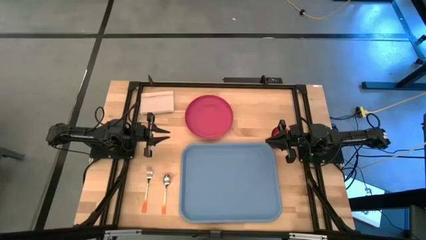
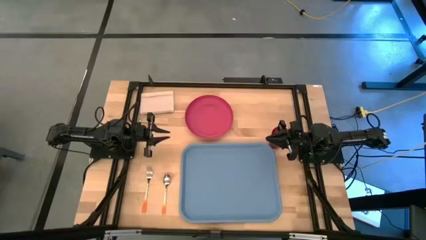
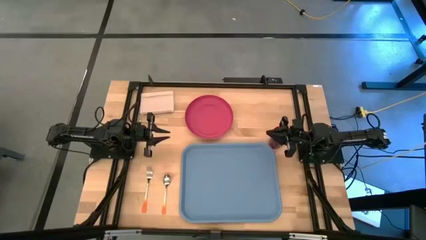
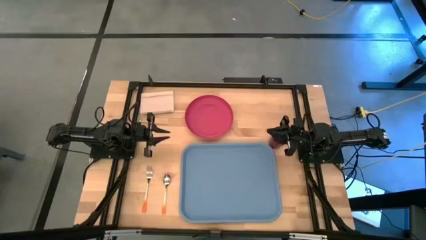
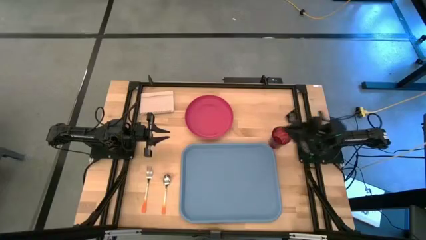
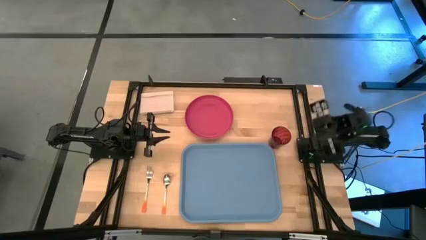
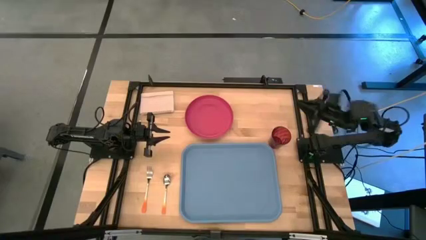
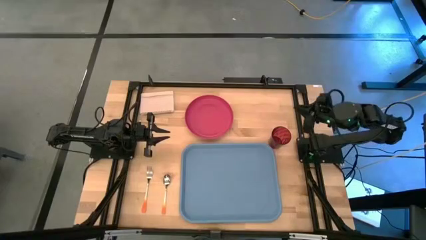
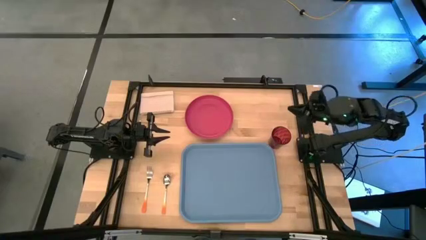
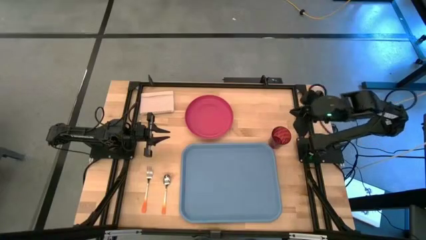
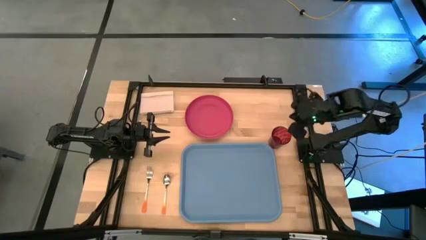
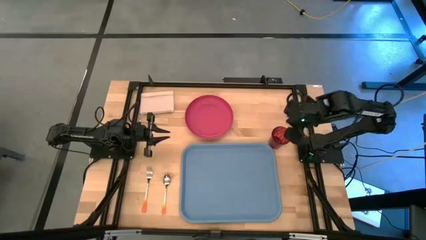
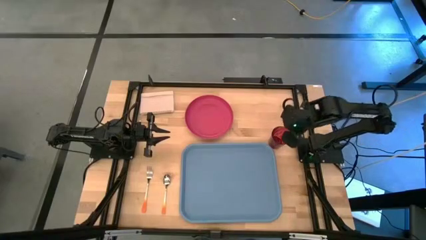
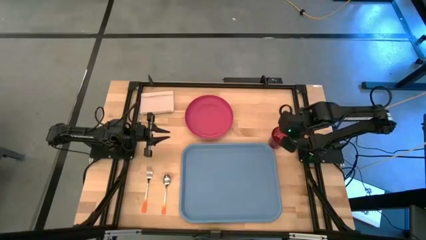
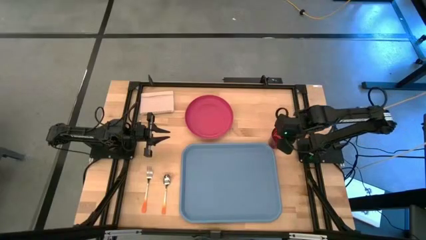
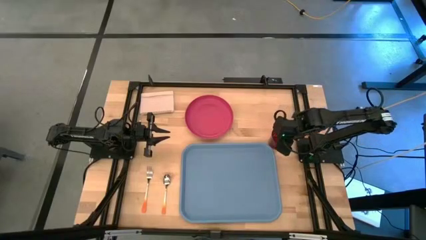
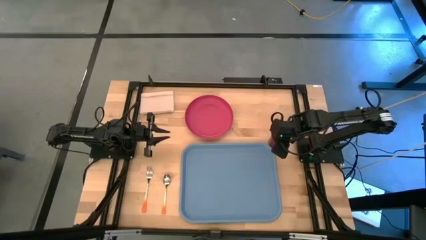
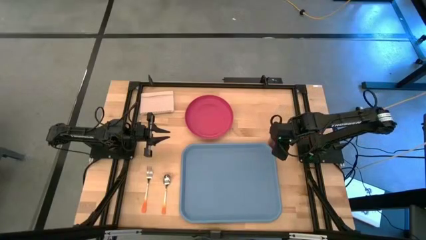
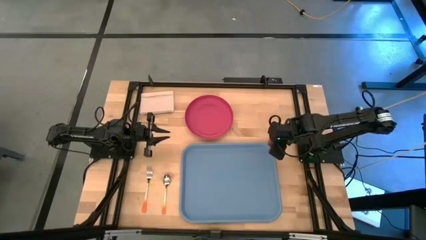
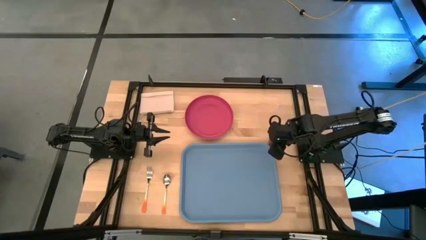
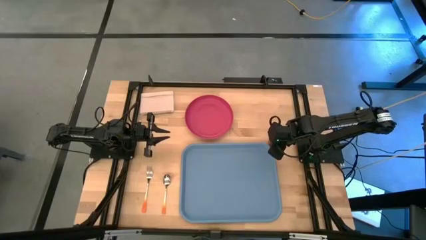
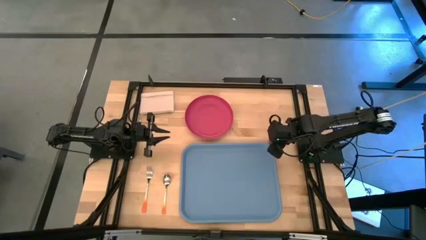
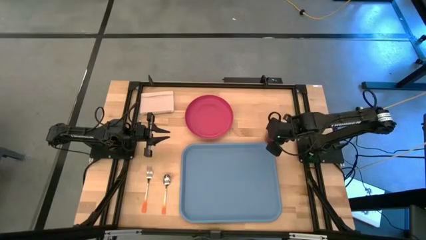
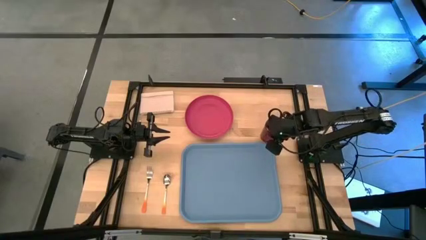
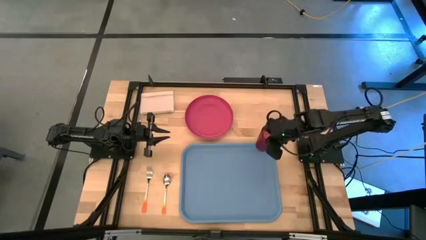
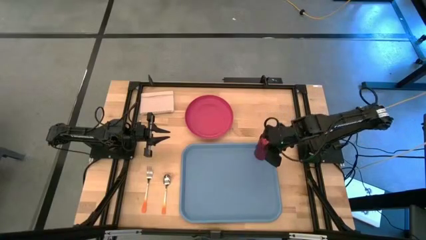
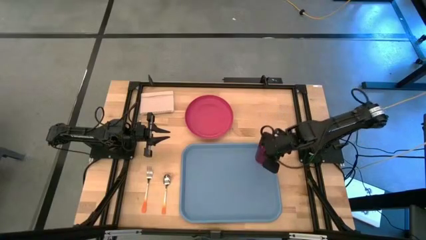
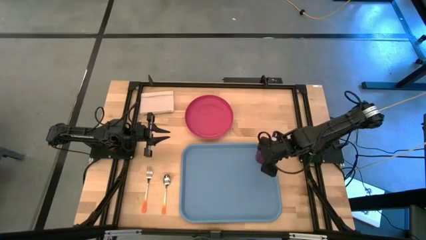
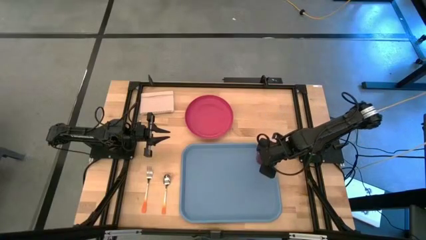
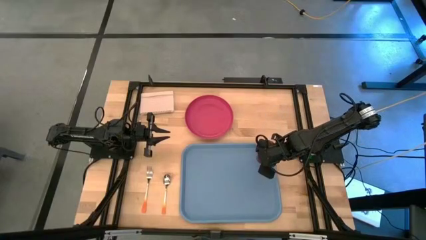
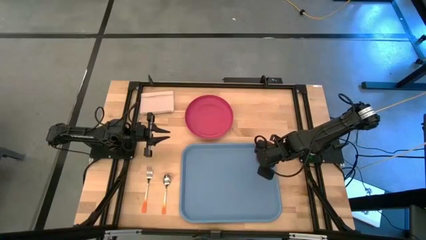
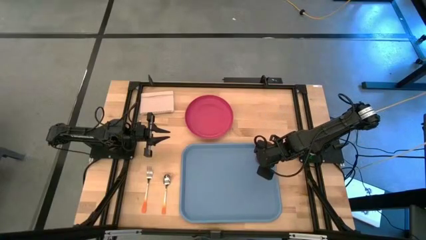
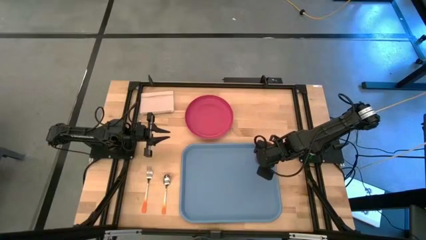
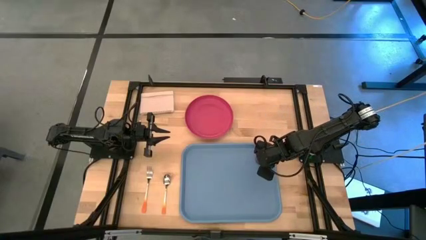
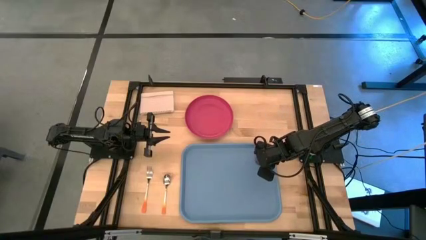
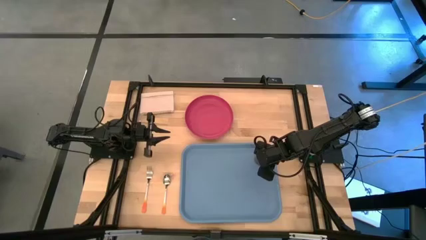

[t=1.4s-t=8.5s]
Task: Pick and place plate/cup/fork/spoon on tray
Put the red cup on the top right of the blue tray

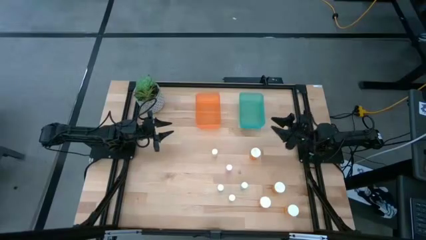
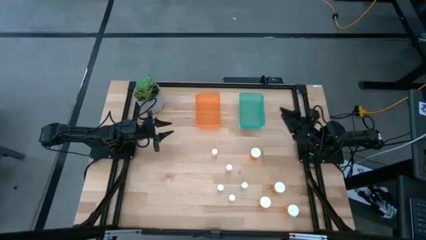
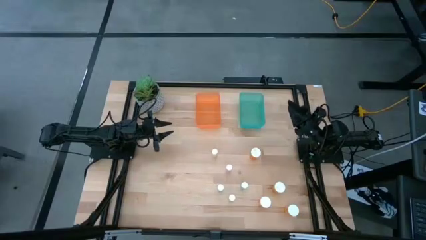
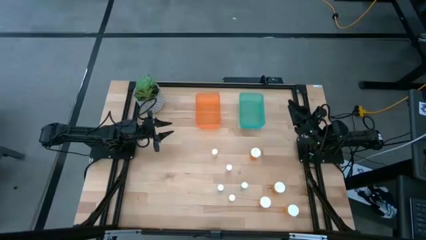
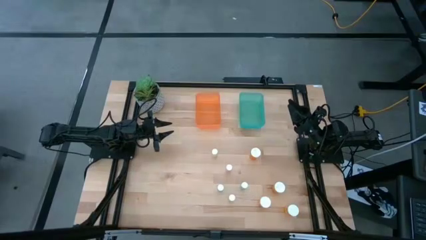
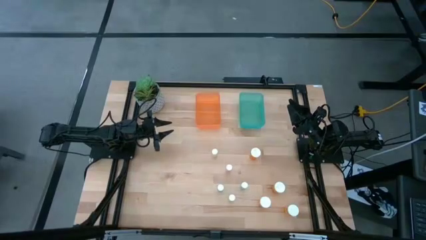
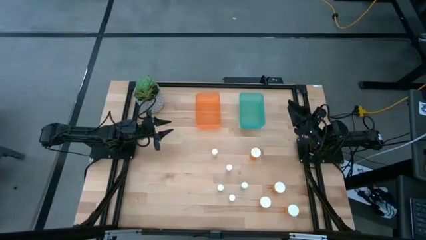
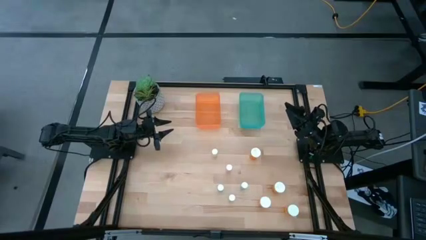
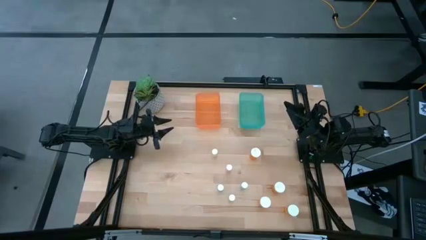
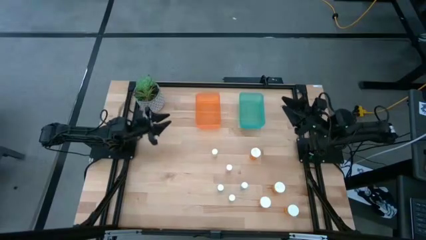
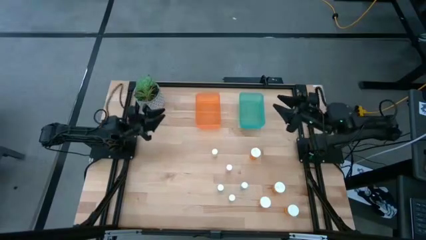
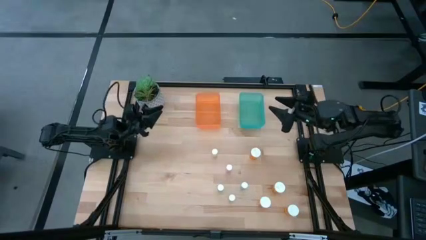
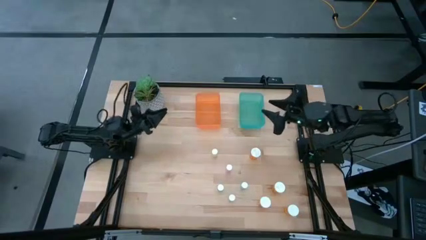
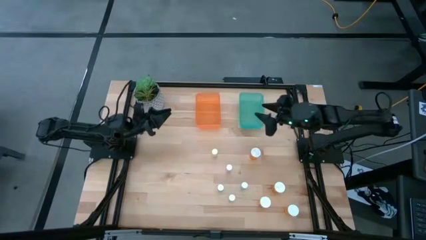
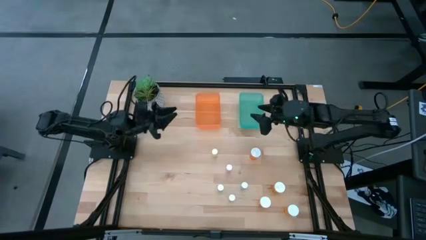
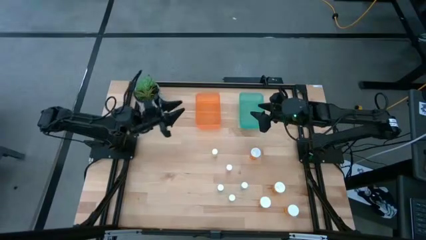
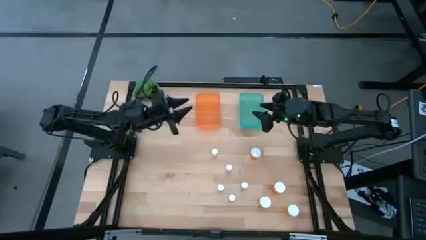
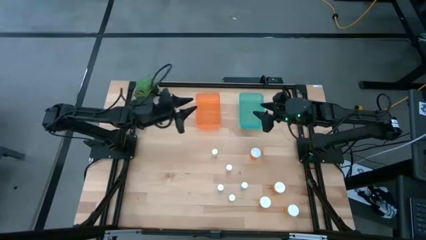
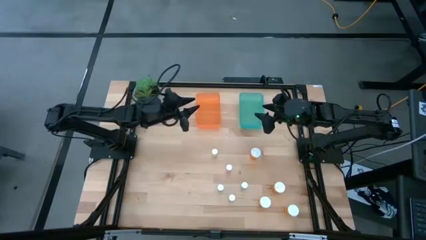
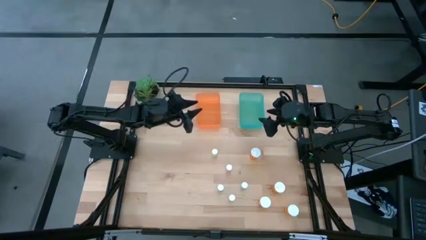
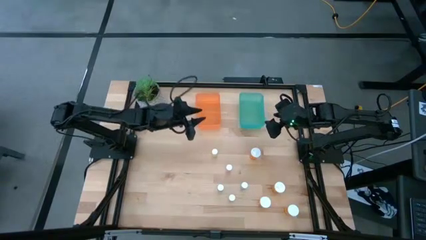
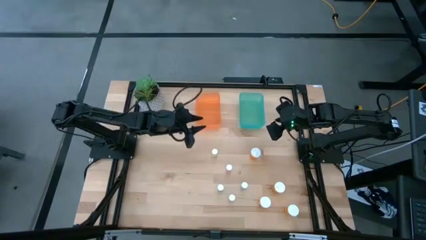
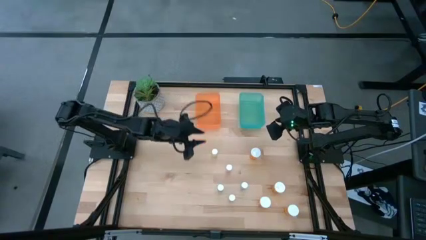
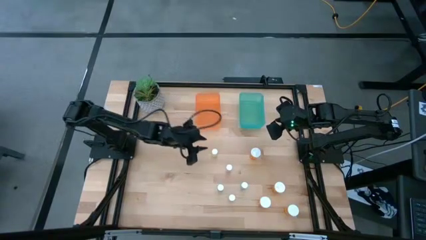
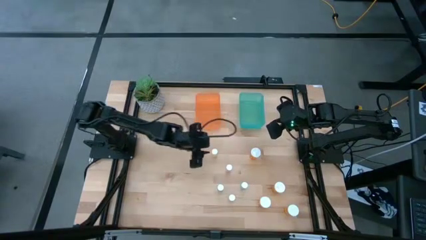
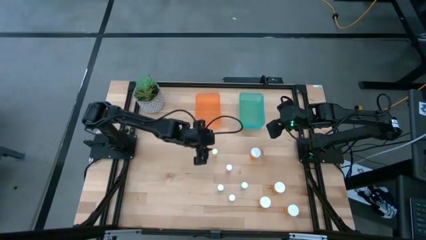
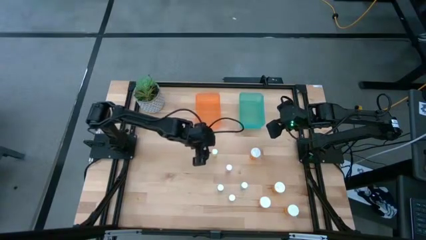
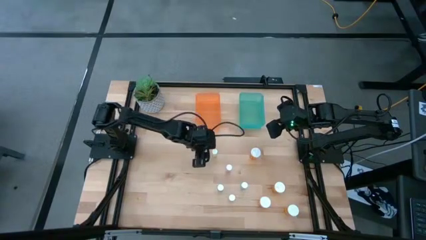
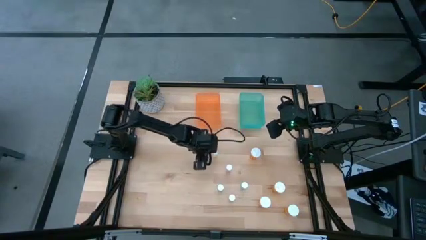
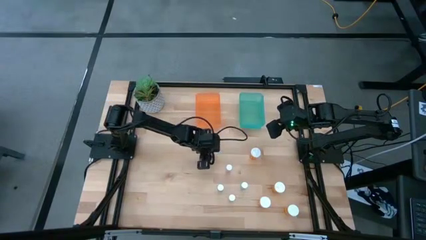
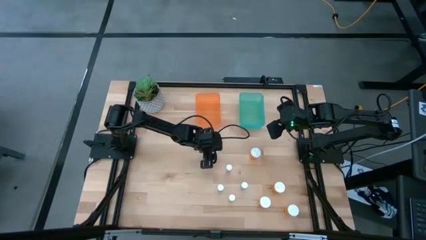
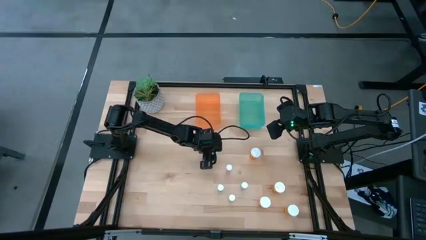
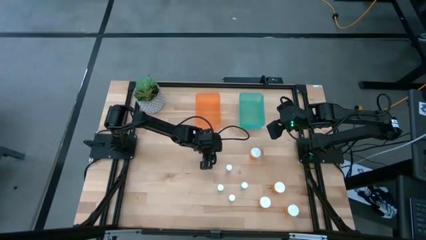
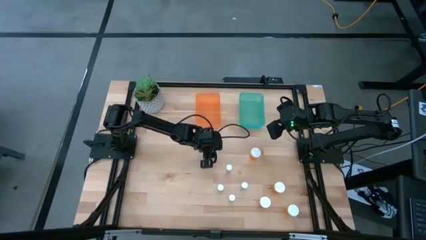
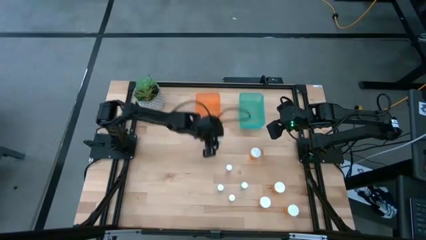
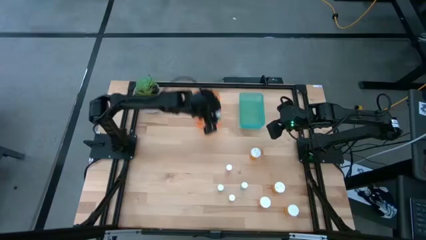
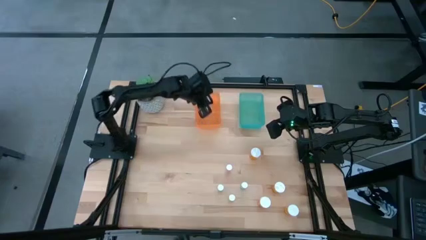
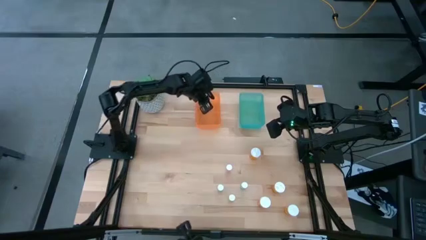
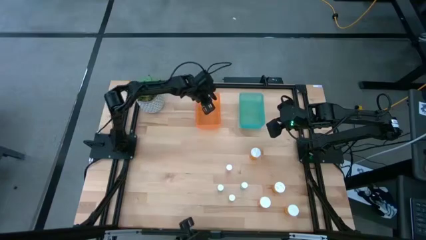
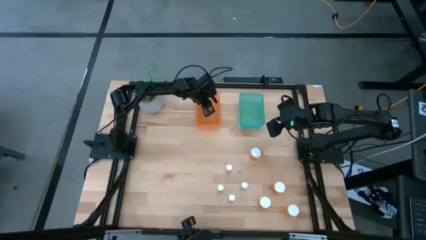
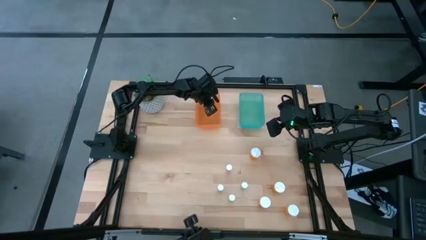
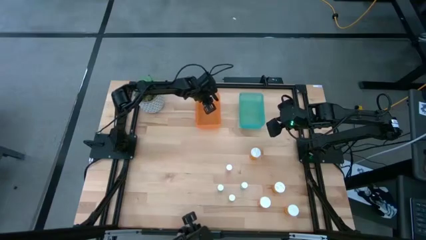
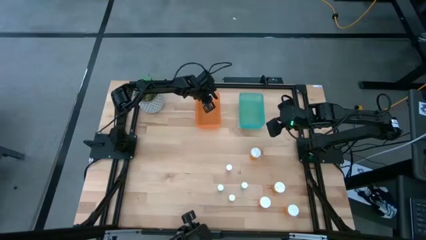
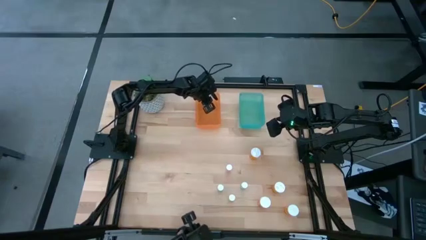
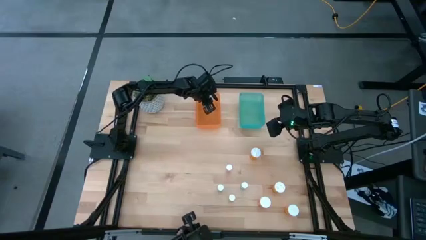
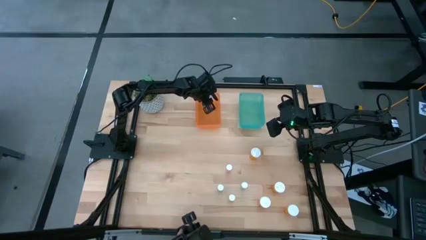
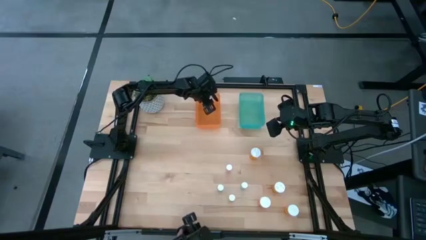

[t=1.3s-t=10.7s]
Task: Pick and place medicine bottles into bin by pill shape (circle, oval)
Put the small yellow pill bottle into the orange bin
